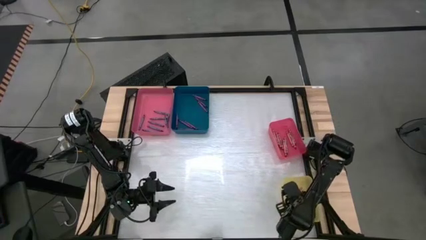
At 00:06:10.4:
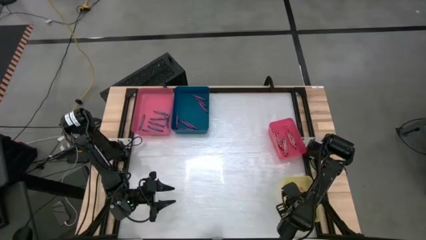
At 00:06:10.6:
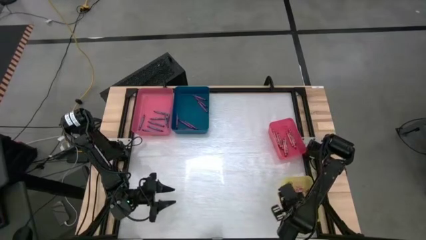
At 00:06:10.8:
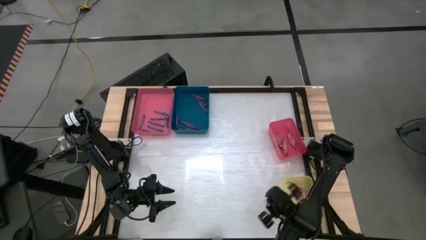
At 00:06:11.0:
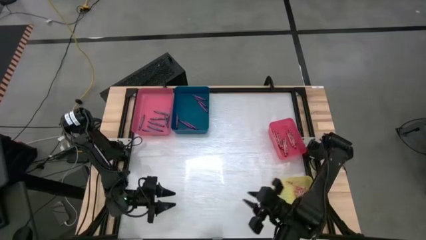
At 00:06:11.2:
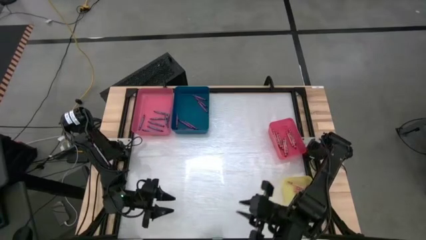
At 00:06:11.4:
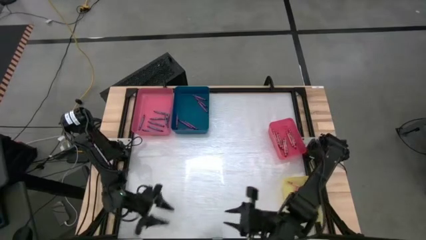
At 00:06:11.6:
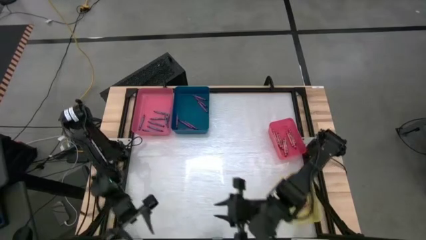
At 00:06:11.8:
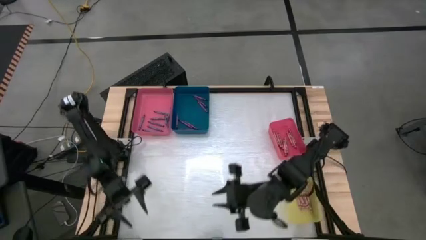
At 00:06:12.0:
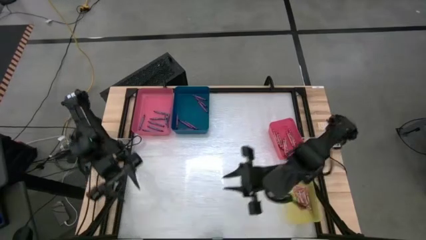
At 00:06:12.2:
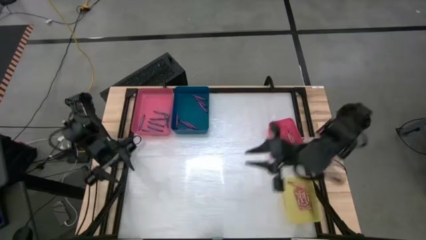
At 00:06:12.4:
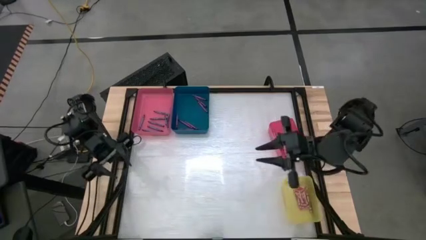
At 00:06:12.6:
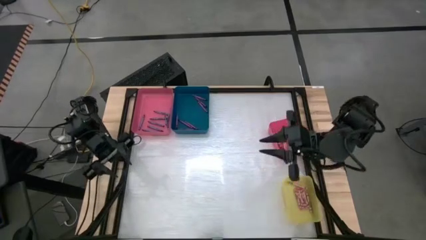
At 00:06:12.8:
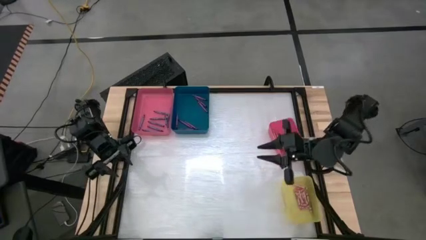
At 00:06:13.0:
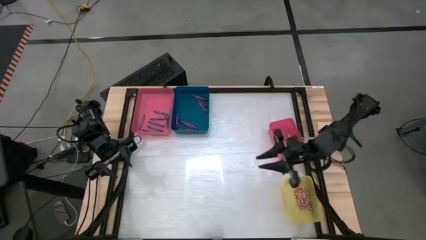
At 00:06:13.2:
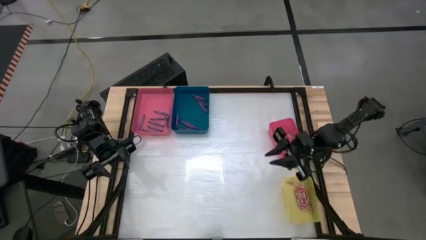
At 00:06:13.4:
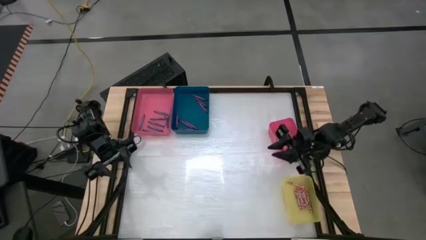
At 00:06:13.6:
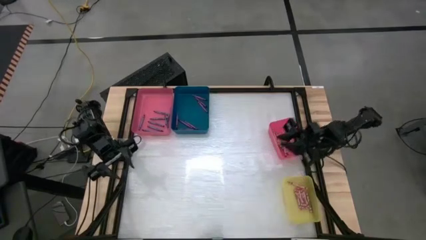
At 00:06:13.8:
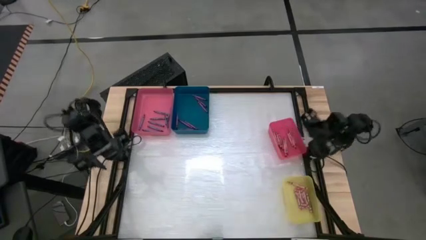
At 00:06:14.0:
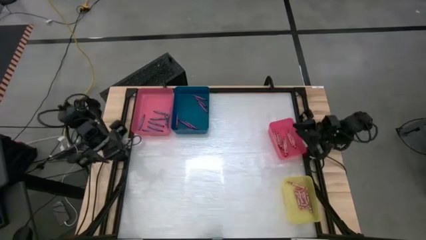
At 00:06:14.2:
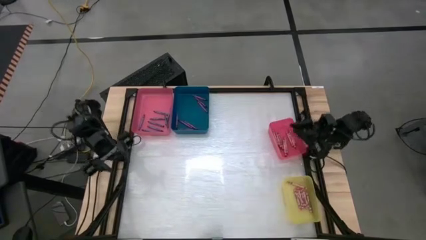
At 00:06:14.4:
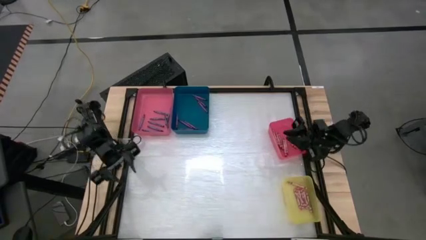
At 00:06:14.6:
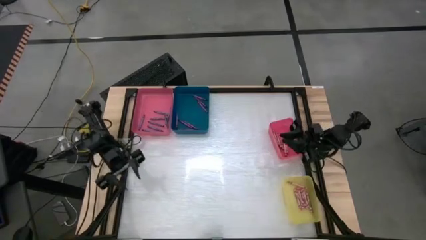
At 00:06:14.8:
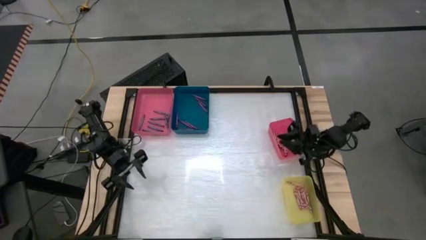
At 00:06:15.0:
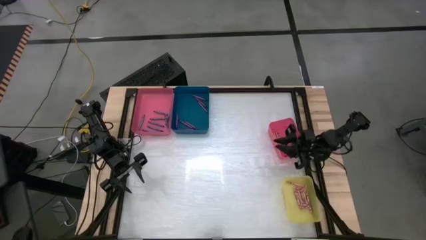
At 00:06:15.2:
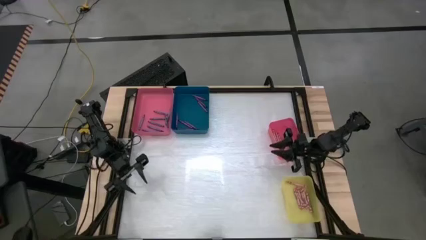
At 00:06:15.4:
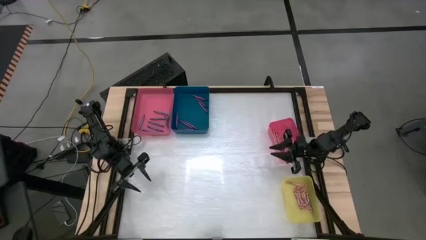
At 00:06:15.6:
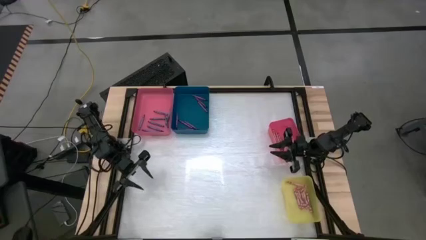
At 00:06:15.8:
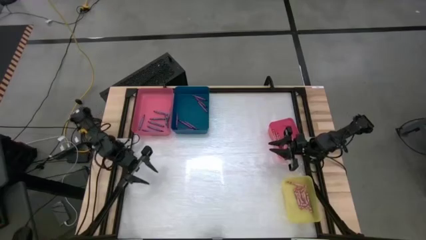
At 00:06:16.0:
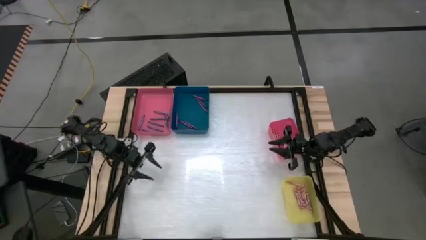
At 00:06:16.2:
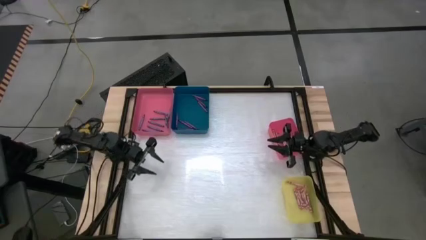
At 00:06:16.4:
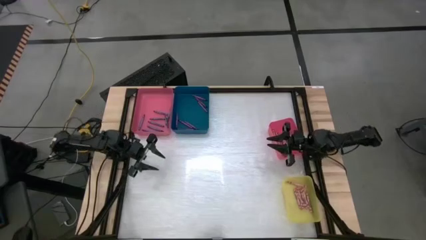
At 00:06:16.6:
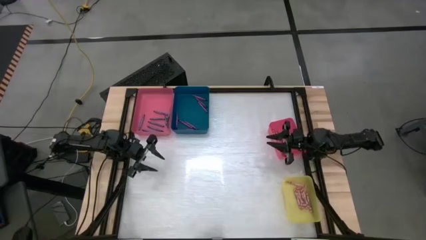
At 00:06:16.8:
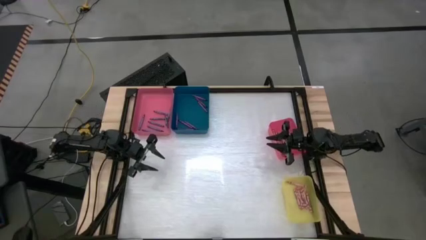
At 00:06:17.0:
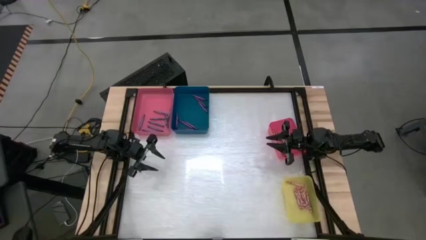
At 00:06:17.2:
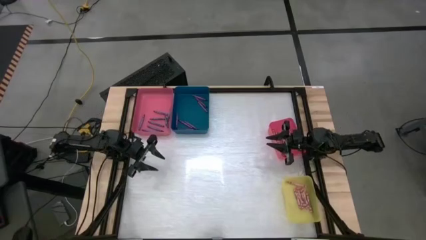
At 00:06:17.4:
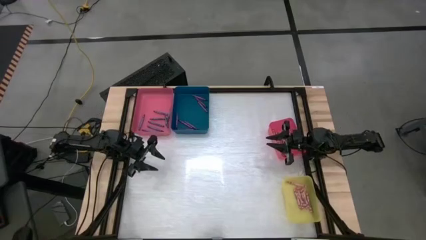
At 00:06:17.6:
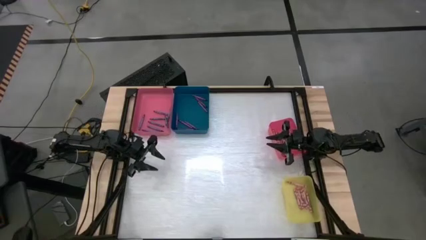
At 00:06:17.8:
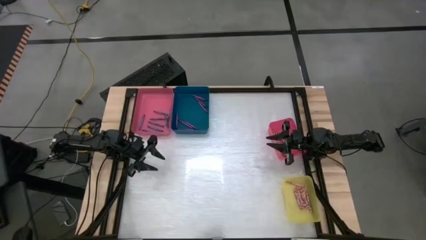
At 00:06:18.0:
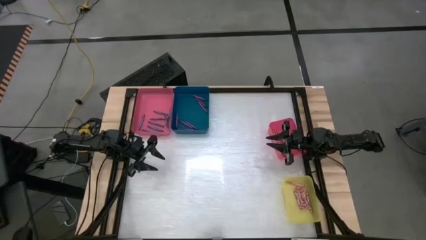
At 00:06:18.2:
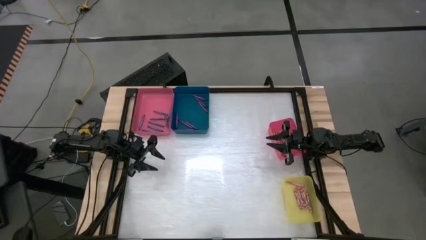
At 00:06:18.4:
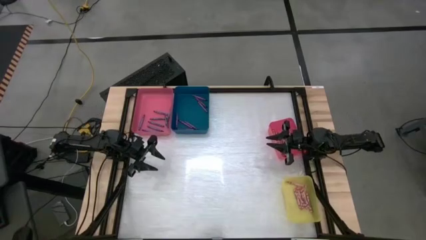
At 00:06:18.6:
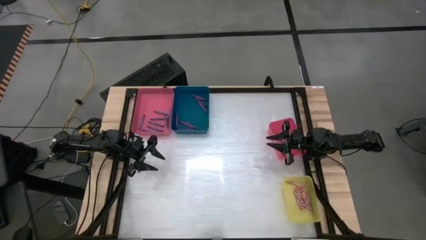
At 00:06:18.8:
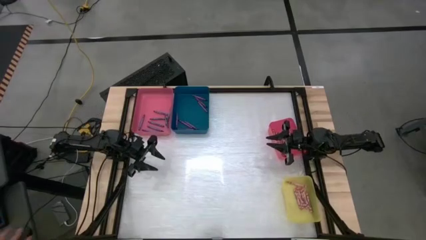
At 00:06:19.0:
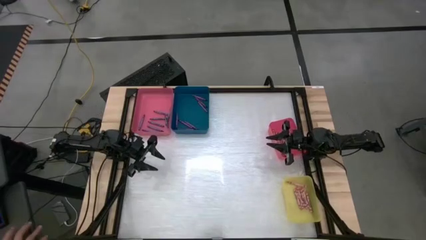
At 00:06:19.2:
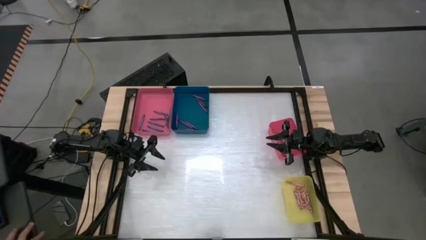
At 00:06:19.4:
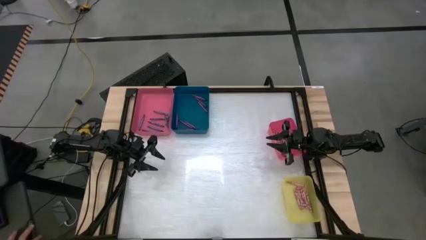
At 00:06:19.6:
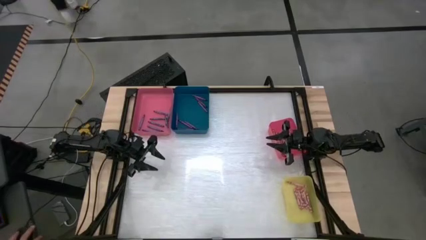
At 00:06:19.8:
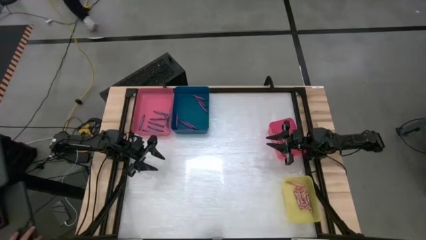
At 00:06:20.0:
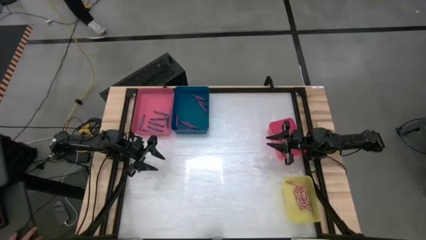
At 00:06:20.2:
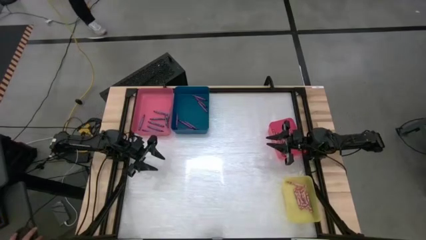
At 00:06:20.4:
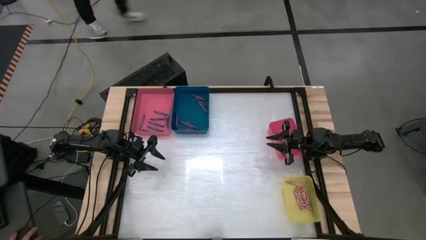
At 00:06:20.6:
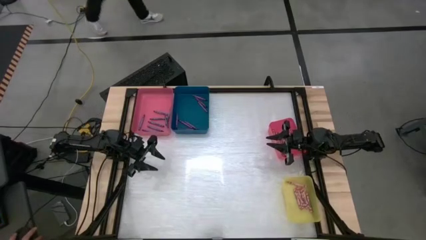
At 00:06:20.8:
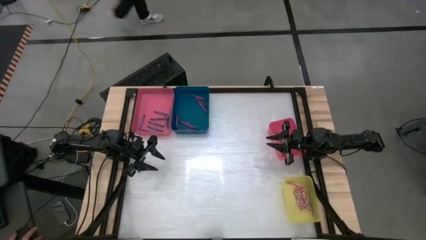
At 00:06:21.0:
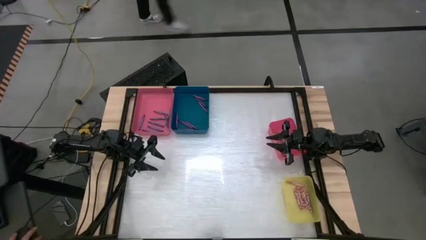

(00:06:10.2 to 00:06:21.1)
Task: Sort crayons
Return to Home Position
